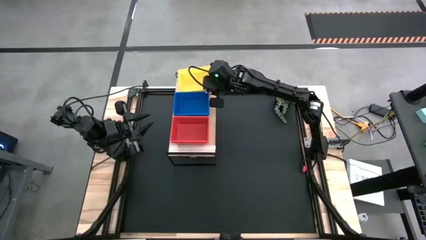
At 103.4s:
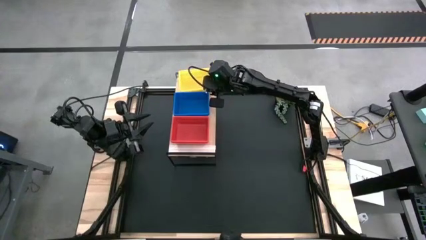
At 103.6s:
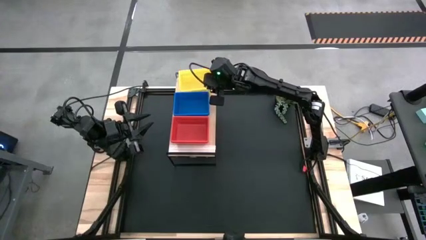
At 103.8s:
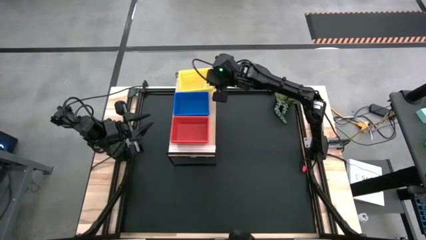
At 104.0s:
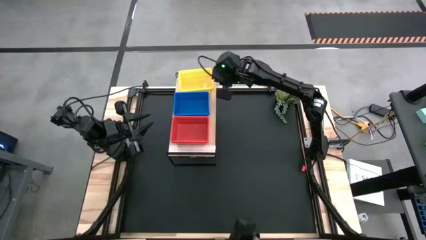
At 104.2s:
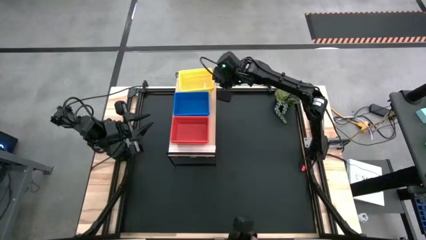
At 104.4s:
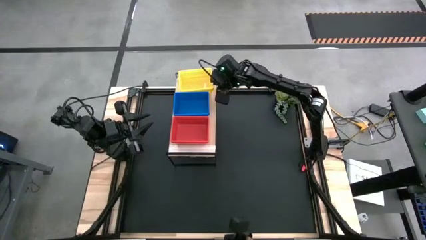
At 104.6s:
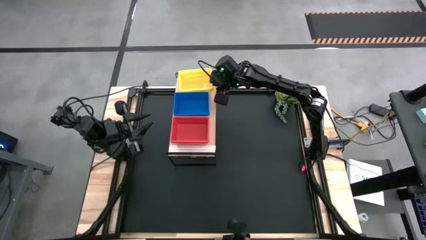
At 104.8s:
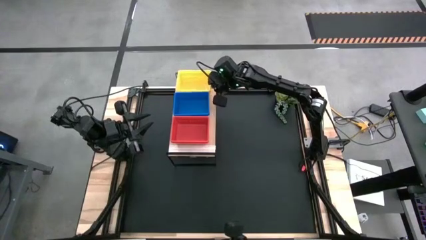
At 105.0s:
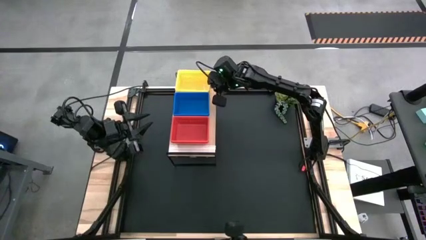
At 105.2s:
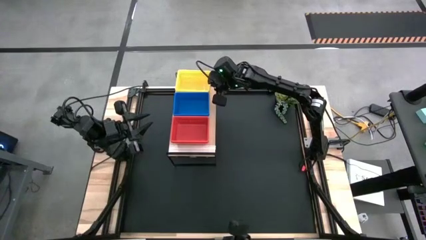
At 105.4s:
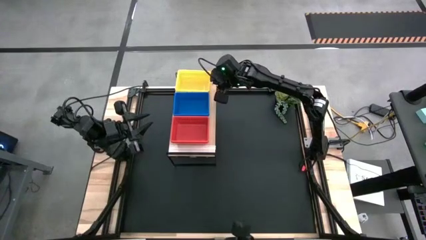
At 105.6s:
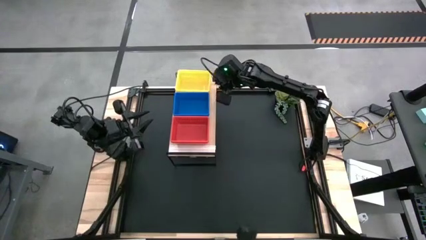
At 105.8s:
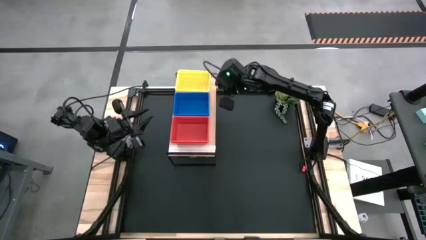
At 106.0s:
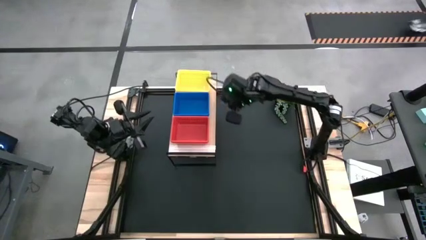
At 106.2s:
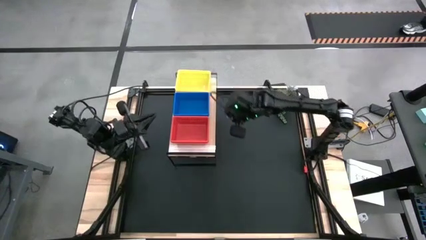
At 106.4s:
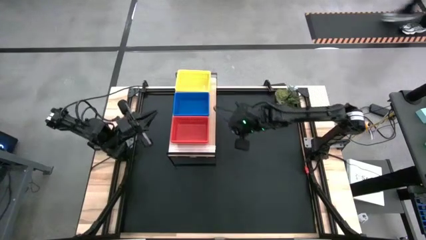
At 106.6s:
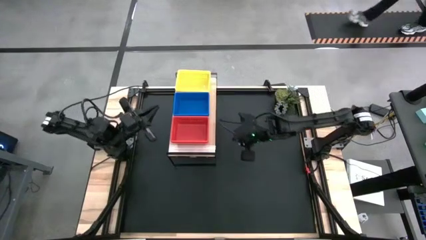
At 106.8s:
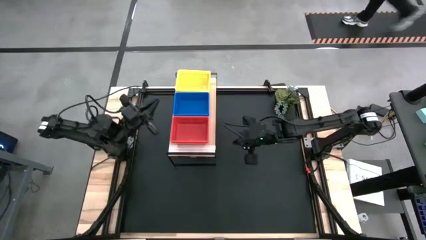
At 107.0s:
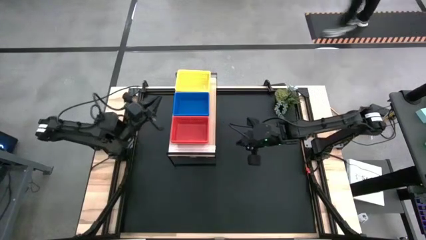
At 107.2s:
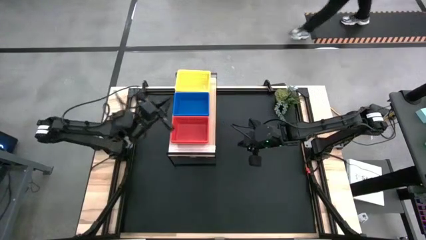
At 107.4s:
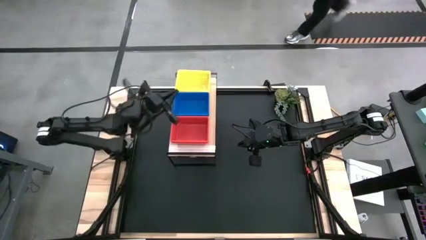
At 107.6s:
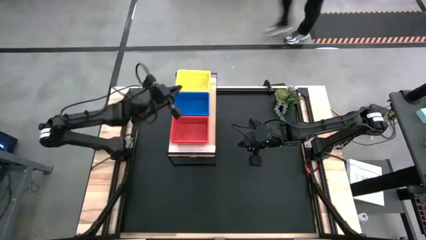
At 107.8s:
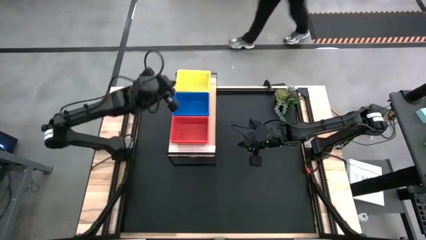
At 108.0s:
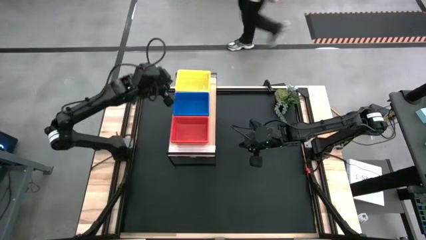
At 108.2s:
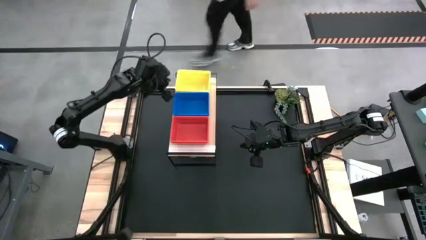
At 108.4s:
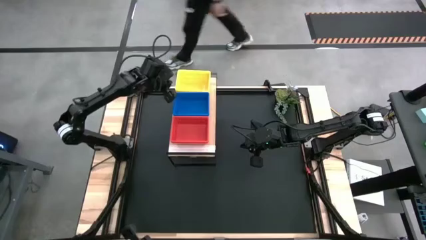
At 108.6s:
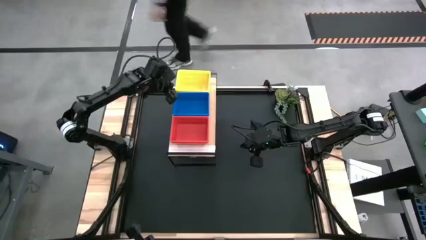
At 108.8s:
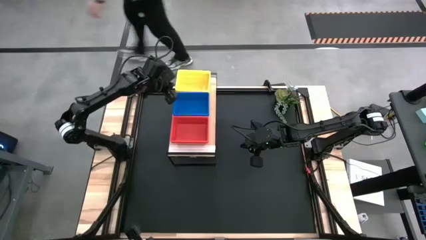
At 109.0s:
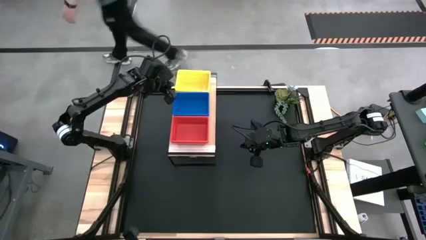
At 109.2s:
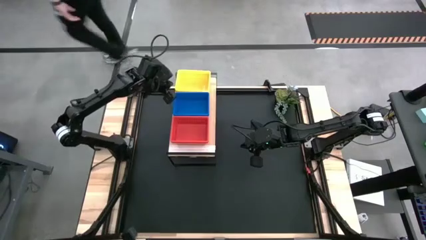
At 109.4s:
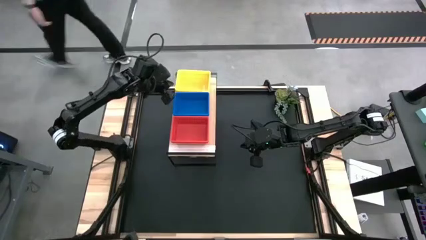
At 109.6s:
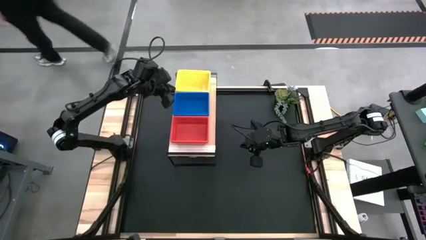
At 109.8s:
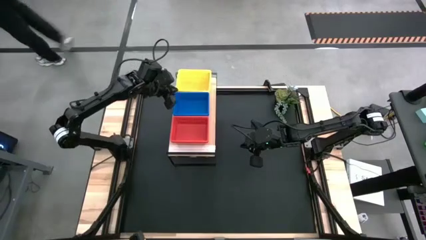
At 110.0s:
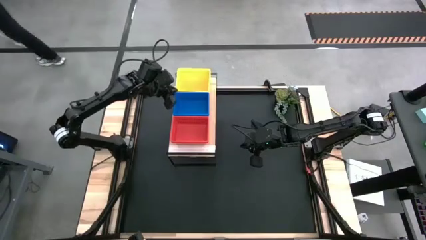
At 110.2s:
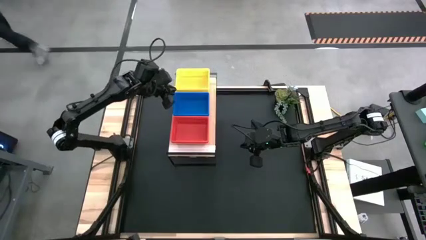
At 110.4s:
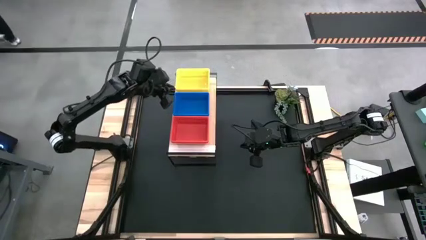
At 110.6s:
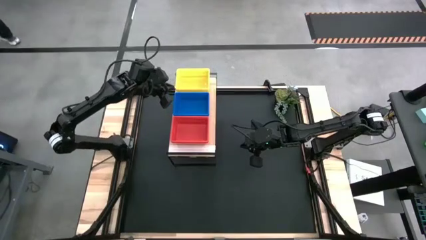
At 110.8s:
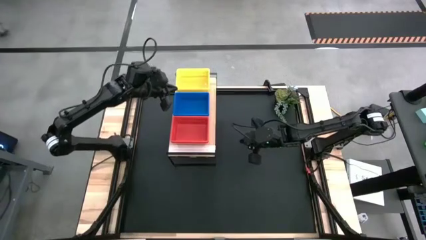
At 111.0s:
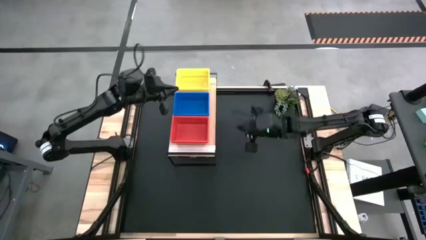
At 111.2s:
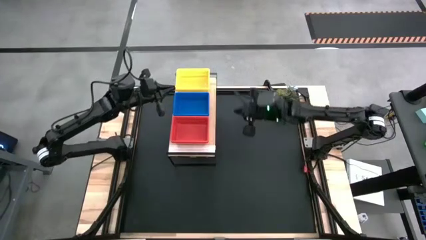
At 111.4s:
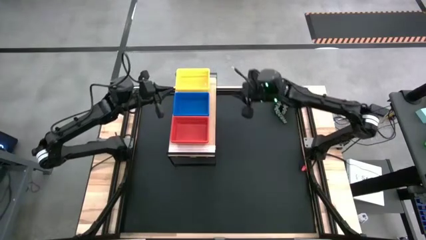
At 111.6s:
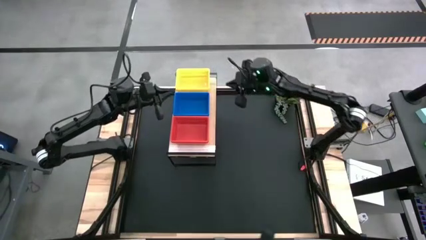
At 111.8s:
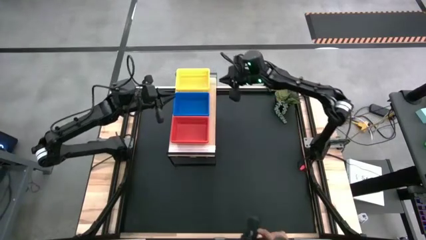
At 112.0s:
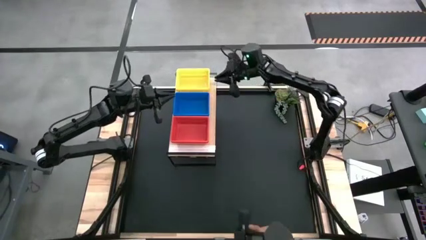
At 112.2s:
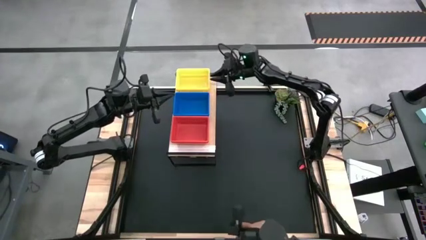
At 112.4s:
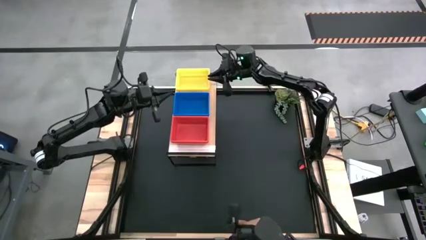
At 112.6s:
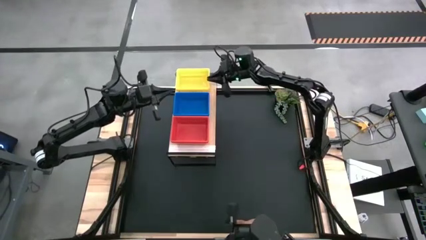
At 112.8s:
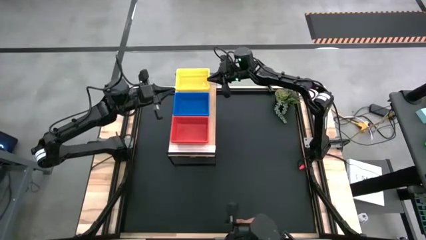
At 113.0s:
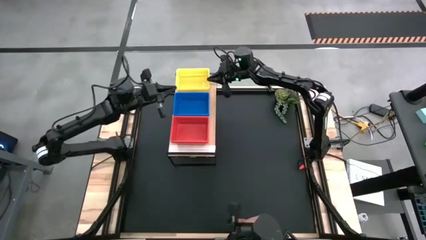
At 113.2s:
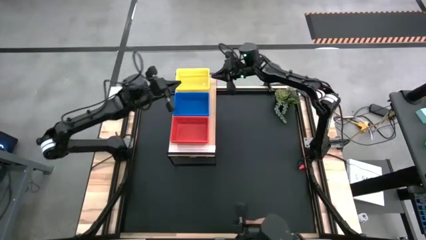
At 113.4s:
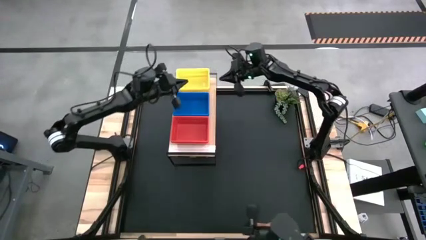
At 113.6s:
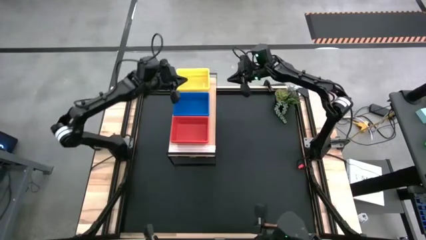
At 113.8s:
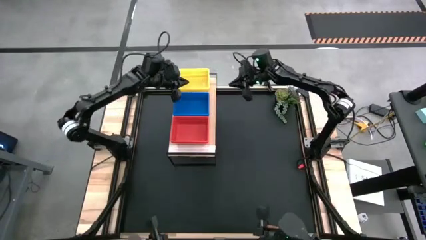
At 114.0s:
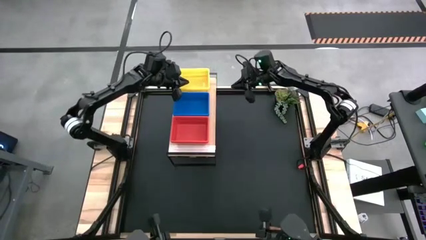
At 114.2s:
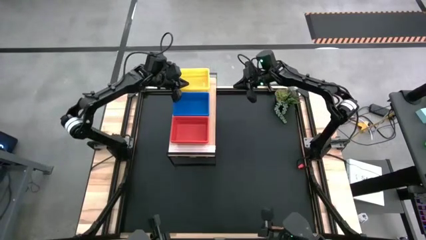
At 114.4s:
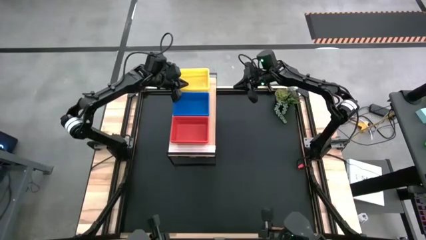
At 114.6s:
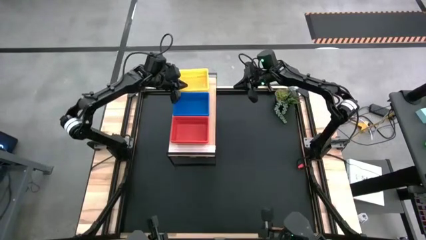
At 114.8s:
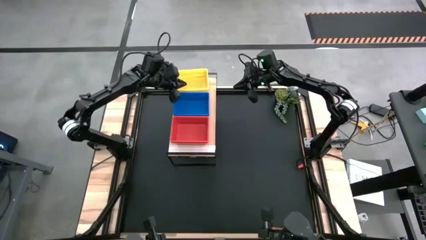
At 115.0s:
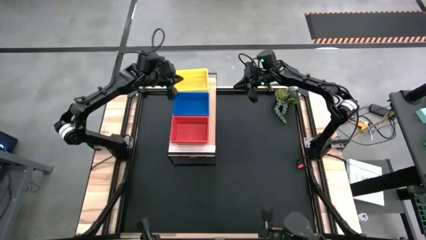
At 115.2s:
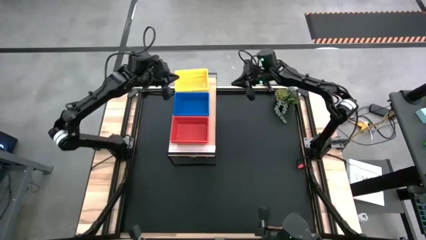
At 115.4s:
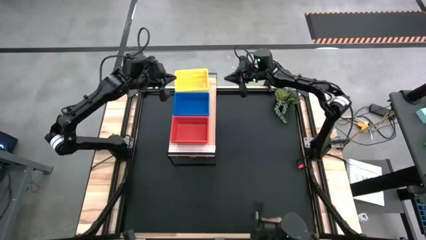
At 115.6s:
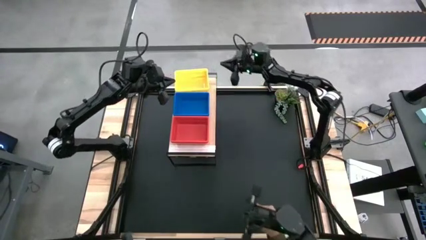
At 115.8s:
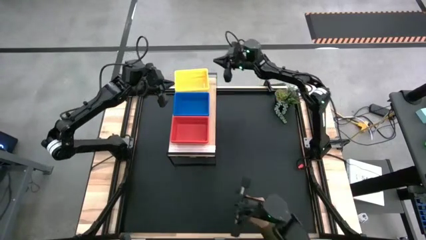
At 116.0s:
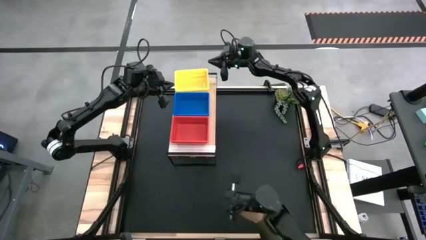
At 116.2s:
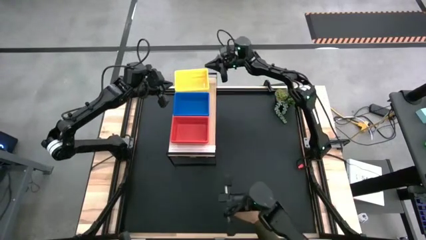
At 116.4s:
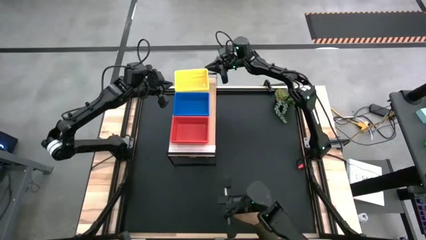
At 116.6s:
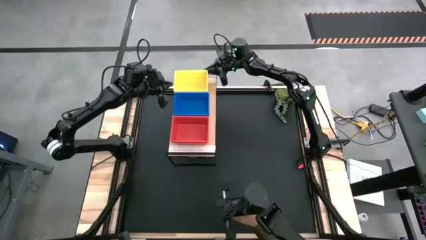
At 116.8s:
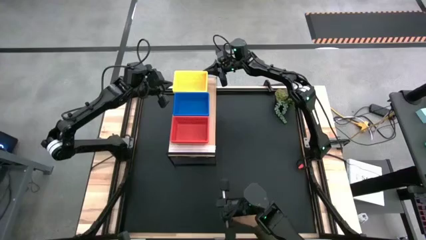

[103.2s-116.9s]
Task: Stack baskets on shelf by color
Adjust the yellow bins on the shelf

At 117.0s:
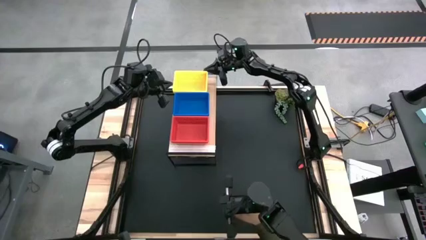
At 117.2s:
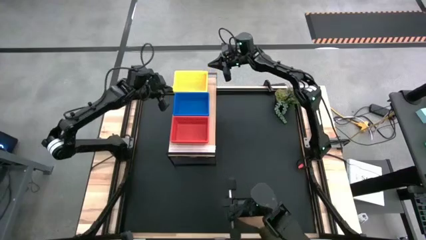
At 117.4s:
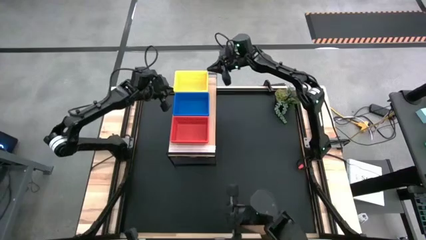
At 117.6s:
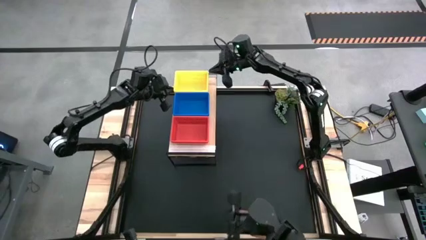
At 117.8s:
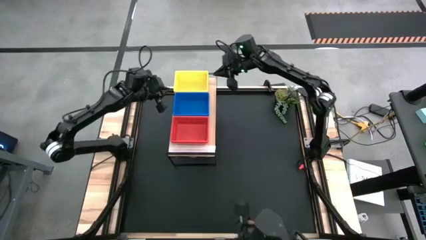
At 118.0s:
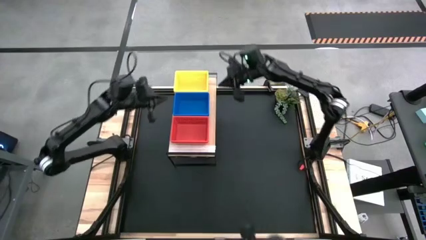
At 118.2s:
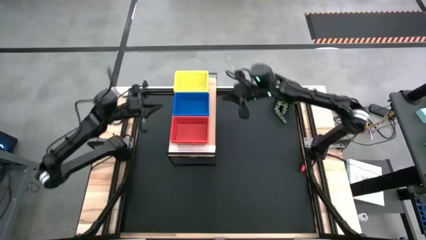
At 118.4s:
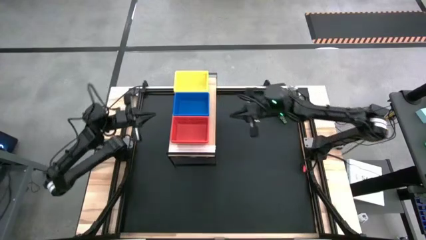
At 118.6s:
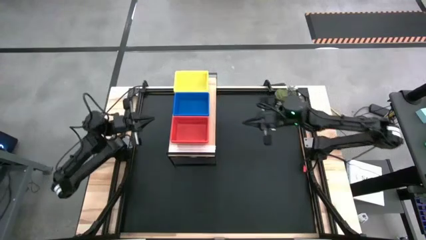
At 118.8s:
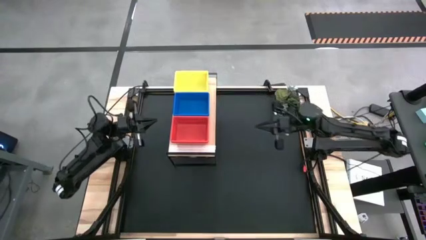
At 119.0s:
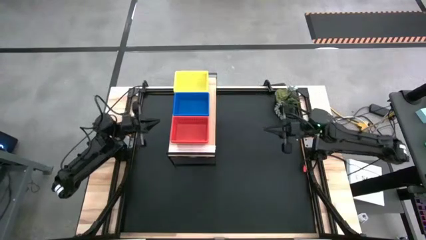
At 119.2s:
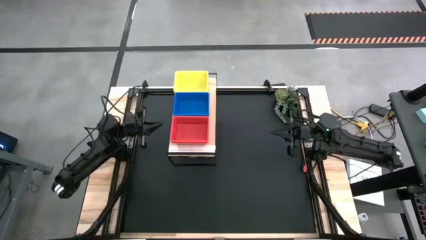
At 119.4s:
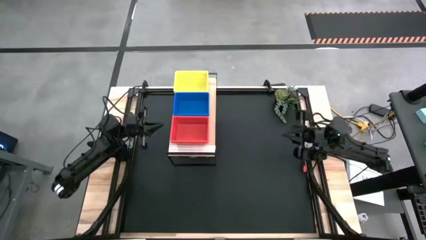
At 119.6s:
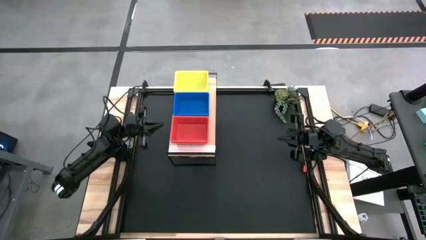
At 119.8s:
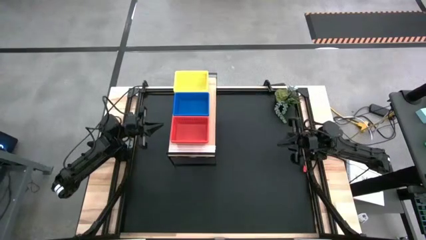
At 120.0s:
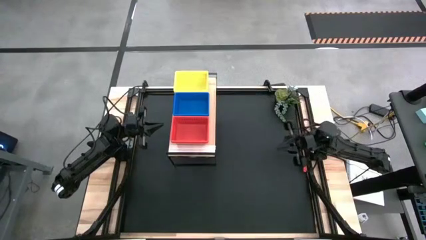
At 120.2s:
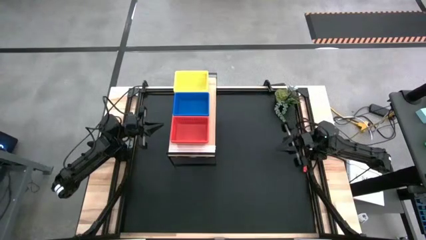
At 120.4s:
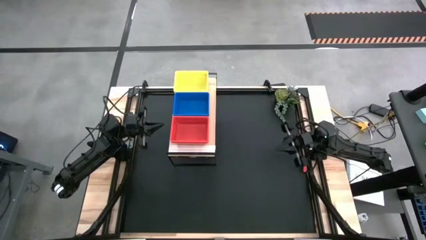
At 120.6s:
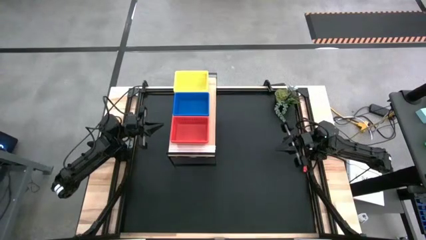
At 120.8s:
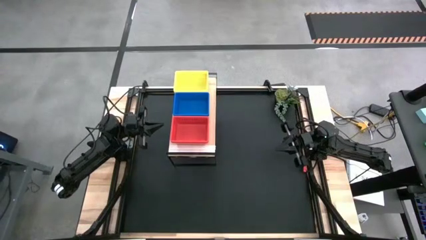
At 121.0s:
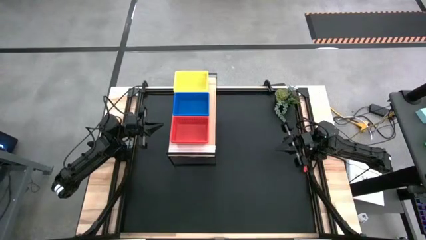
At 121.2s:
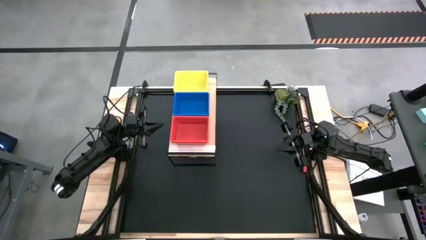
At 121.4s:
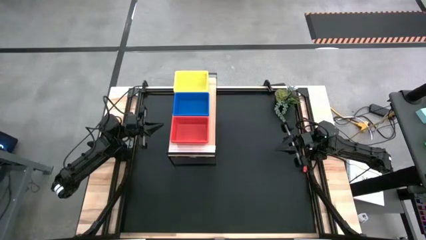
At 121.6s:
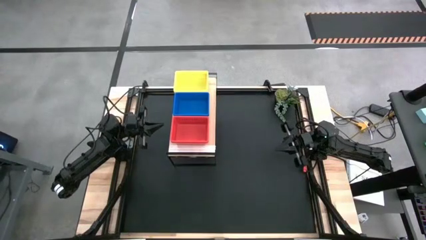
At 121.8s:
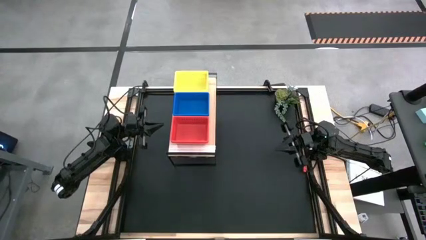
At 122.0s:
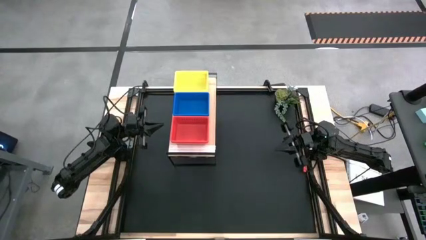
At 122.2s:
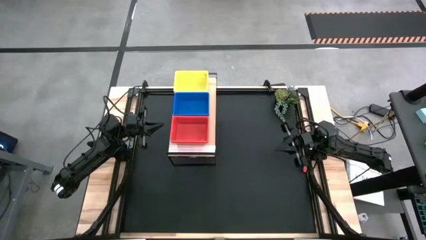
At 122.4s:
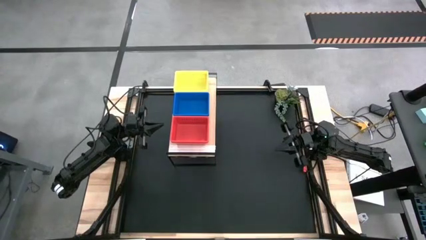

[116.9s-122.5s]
Return to Home Position
